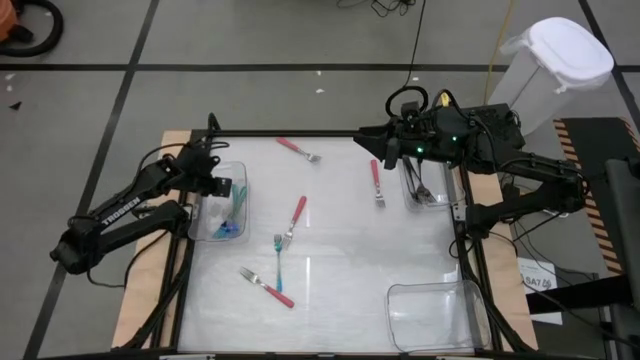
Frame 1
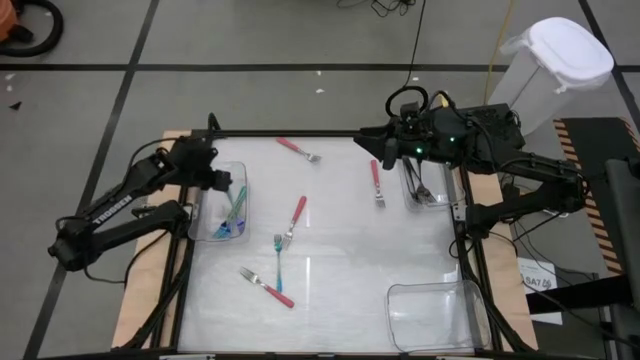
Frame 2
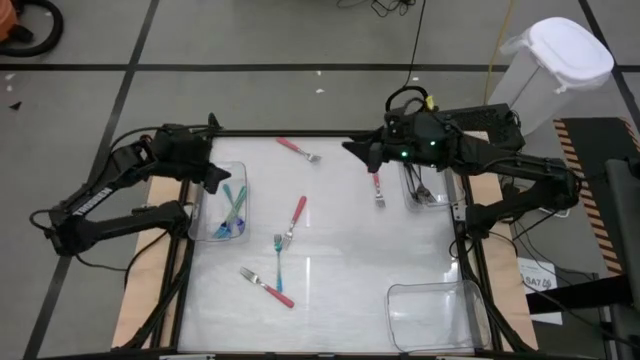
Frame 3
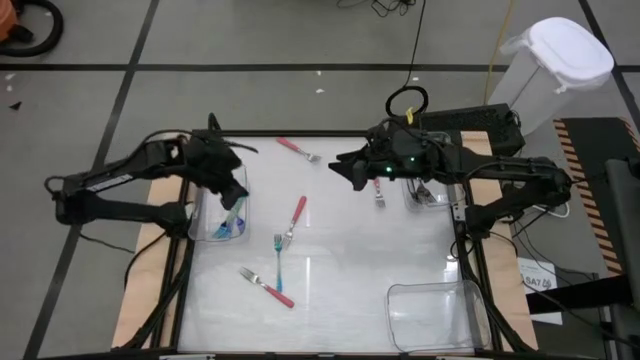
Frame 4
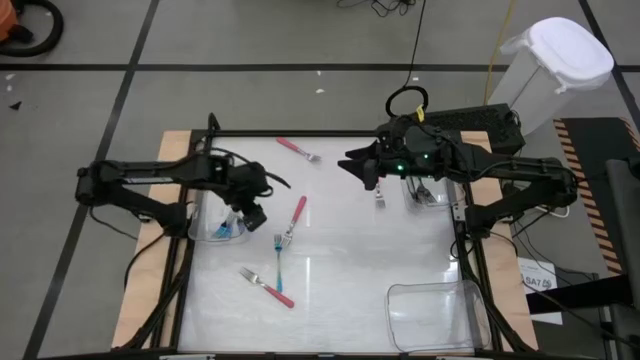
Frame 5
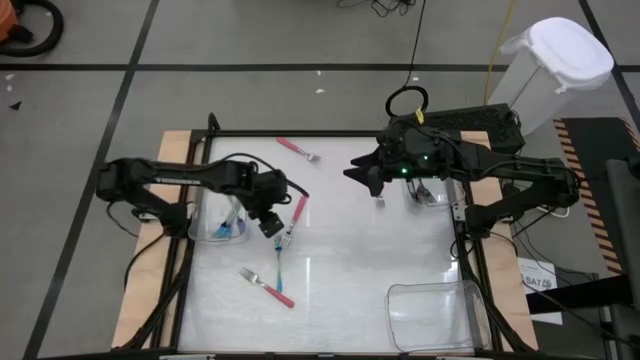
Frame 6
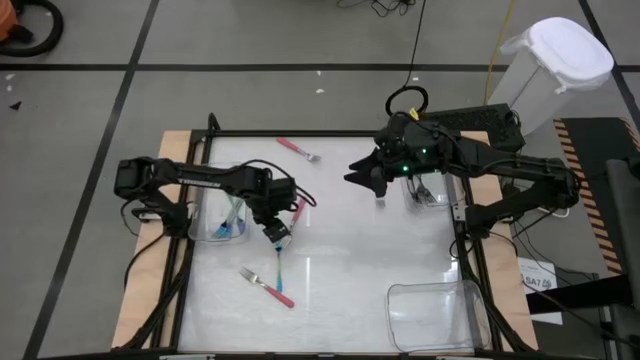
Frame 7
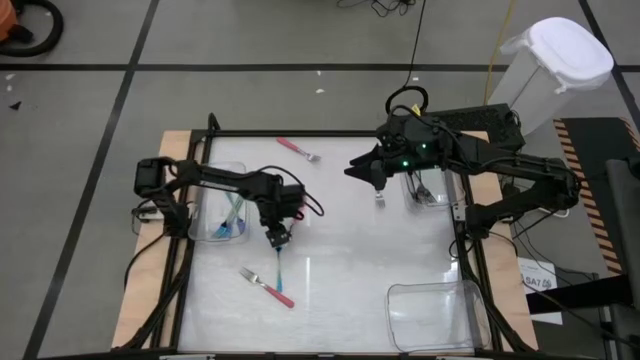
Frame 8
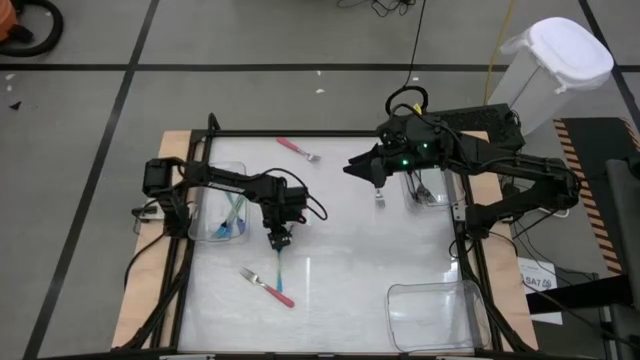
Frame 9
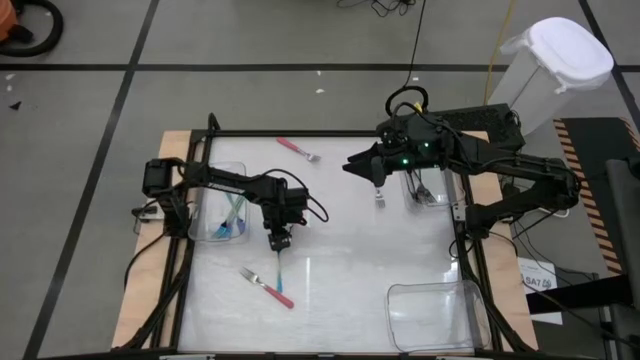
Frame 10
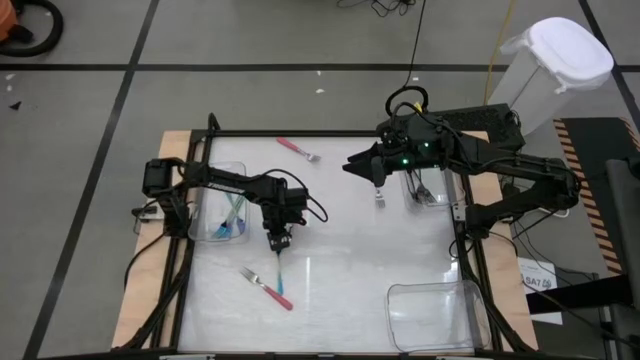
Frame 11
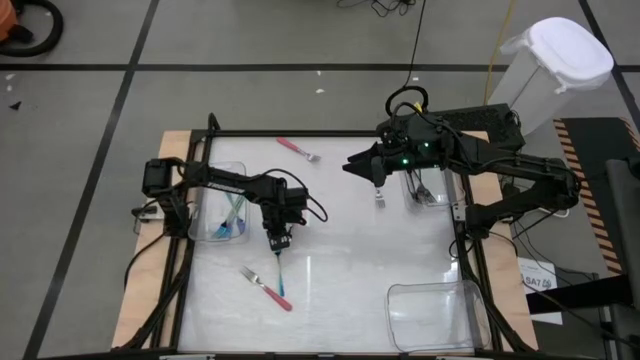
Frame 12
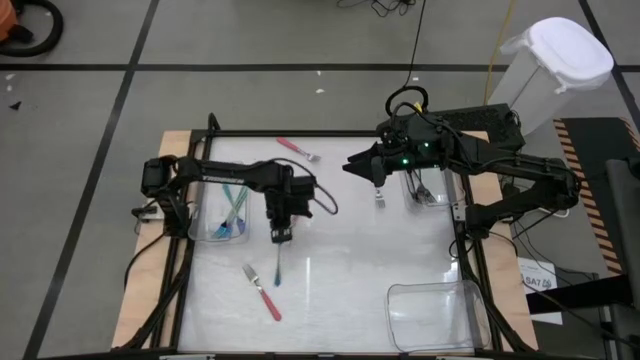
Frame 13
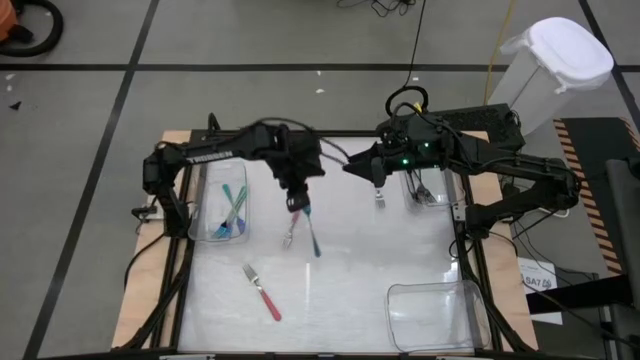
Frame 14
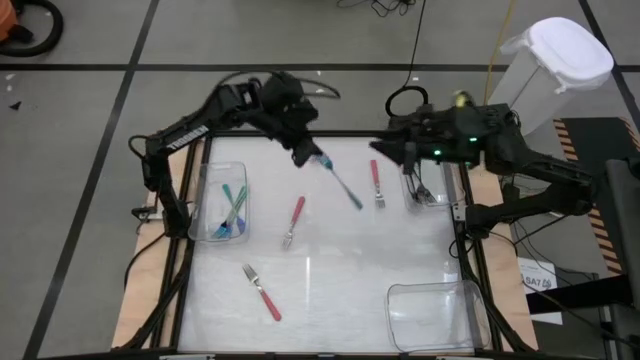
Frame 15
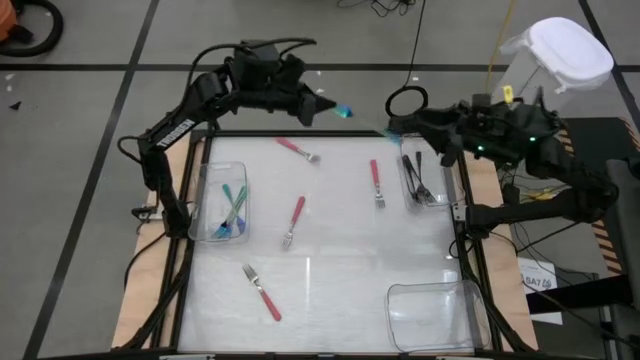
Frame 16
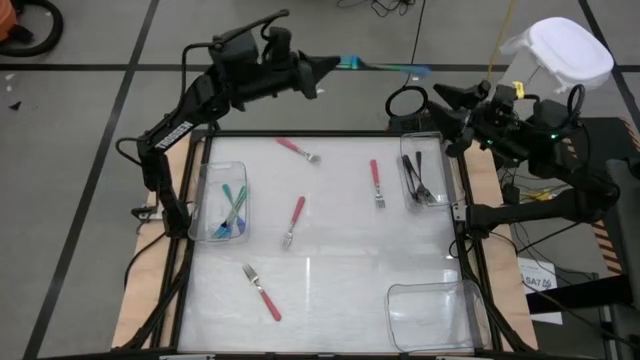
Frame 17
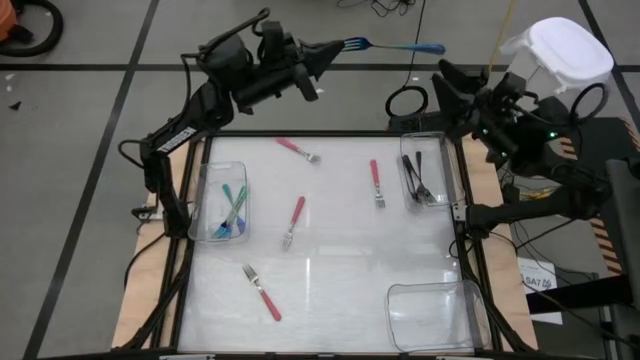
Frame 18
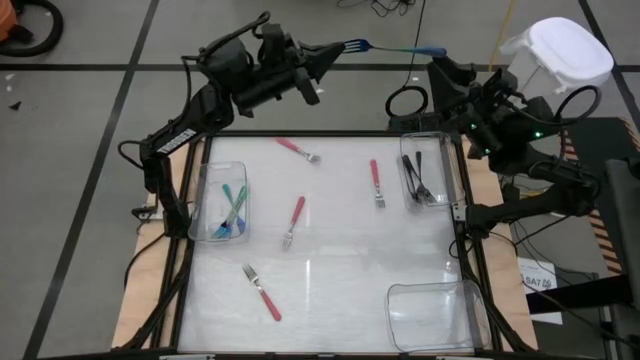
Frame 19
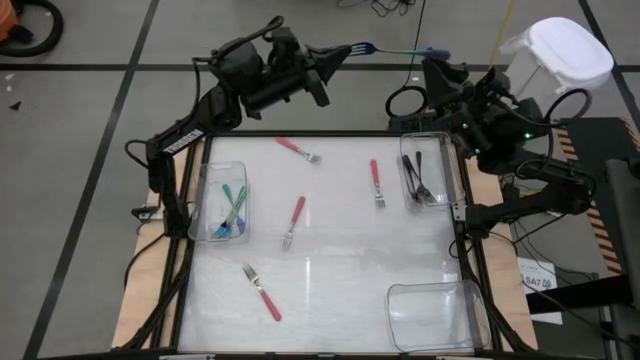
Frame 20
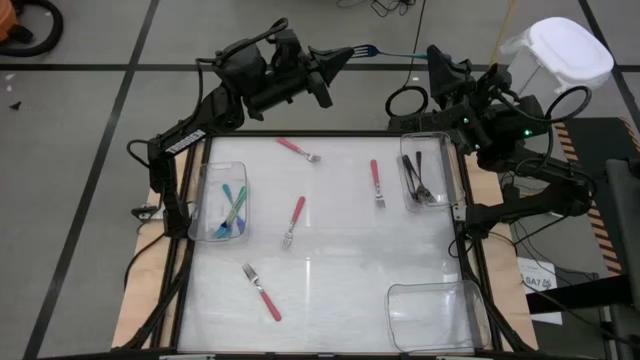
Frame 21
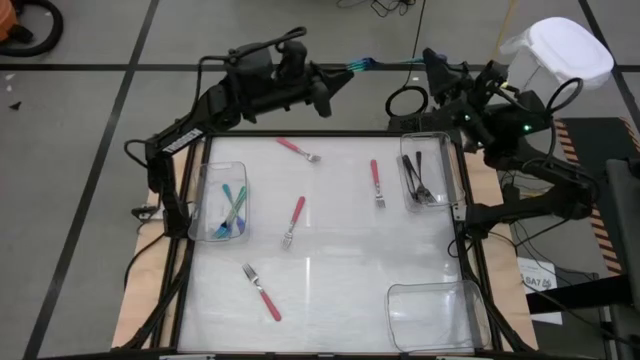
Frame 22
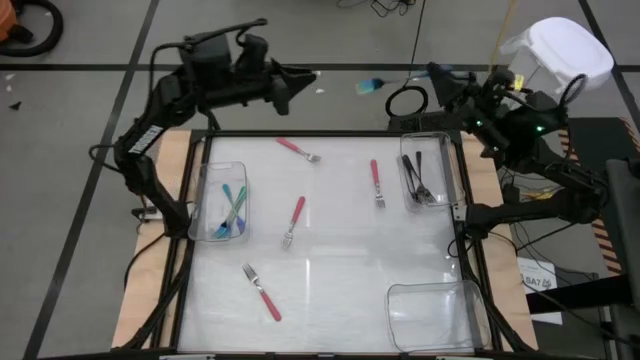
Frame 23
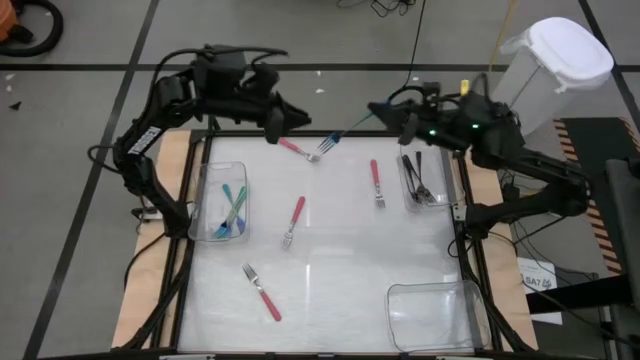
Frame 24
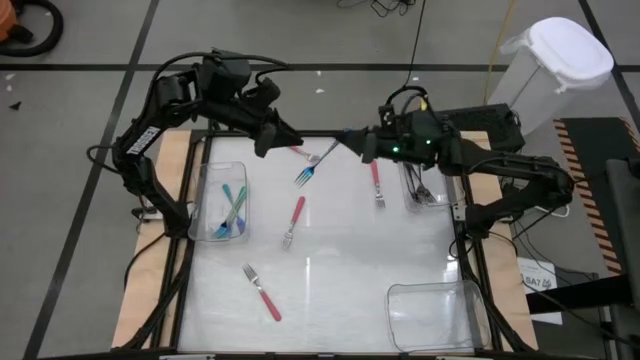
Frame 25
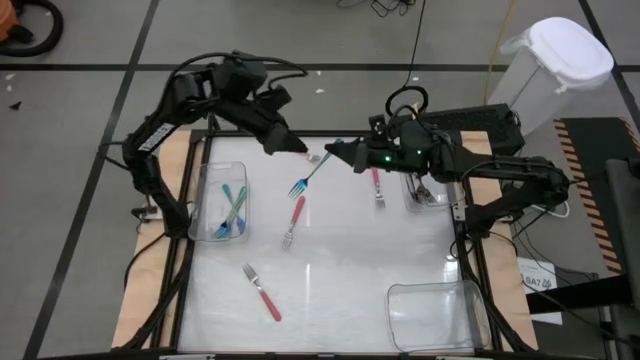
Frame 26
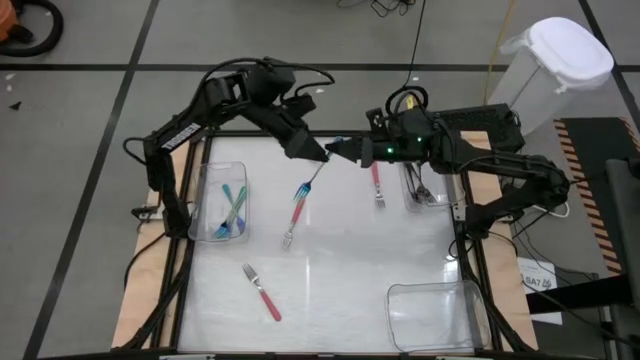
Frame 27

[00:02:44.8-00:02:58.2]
Task: Sort silverware by color (type)
Put the blue fork into the left transparent bin

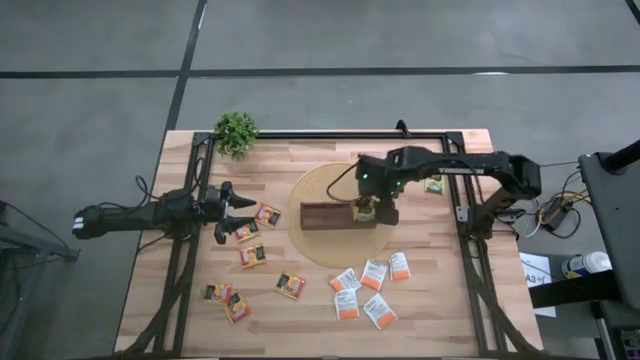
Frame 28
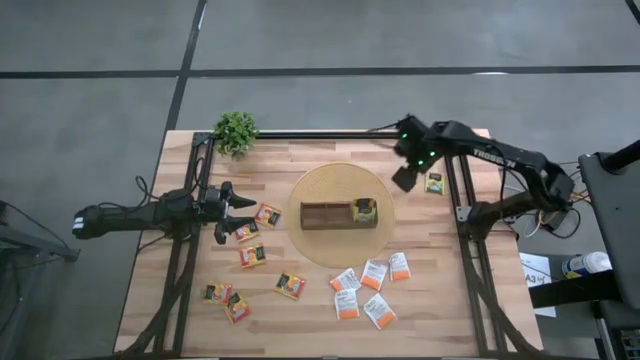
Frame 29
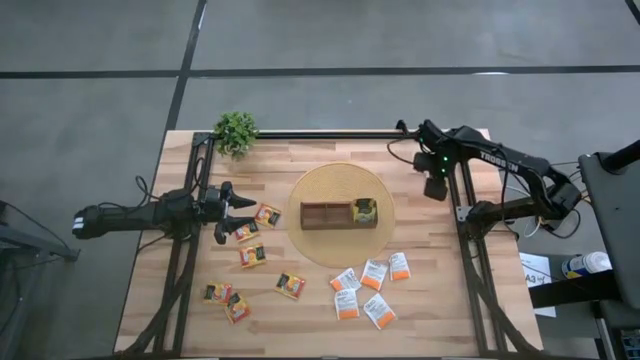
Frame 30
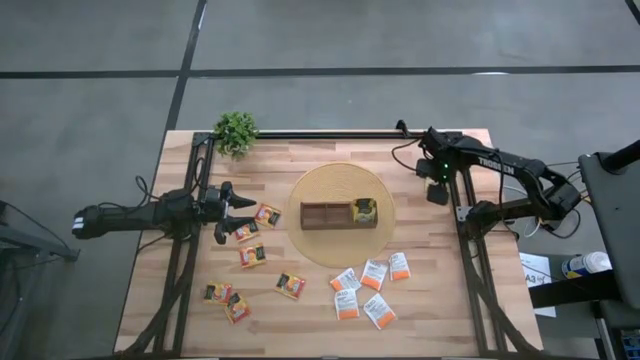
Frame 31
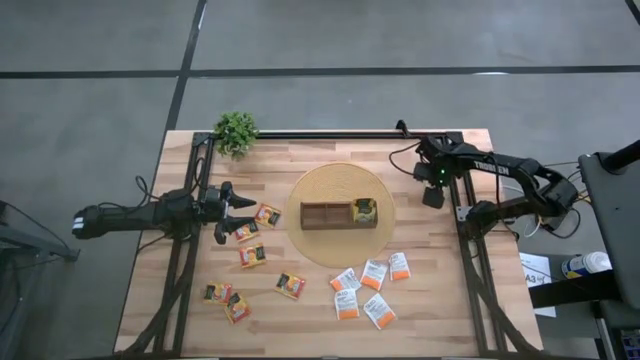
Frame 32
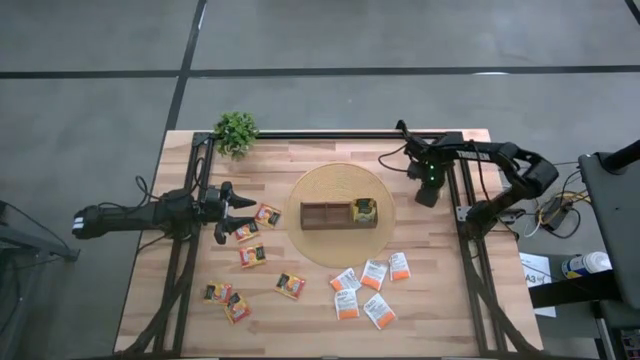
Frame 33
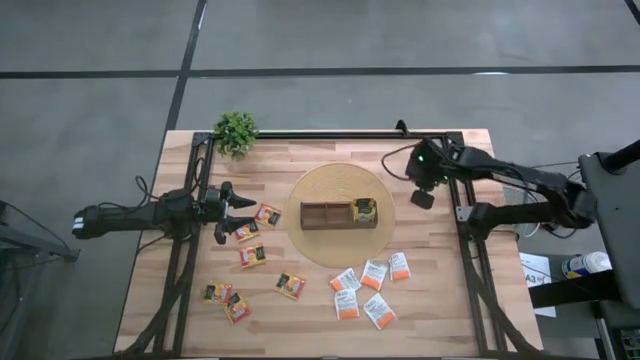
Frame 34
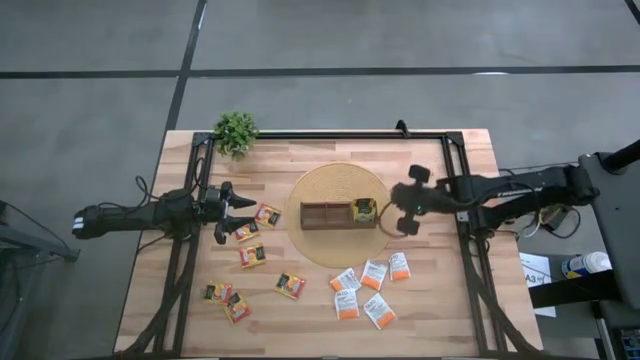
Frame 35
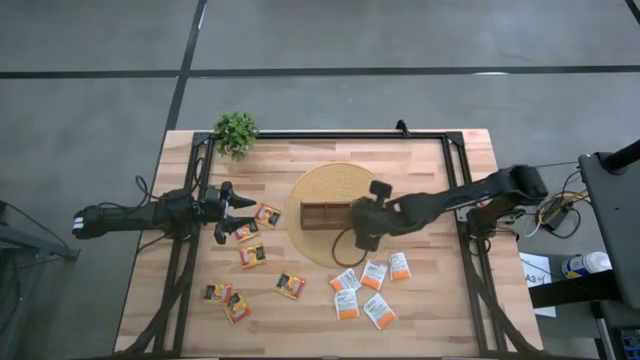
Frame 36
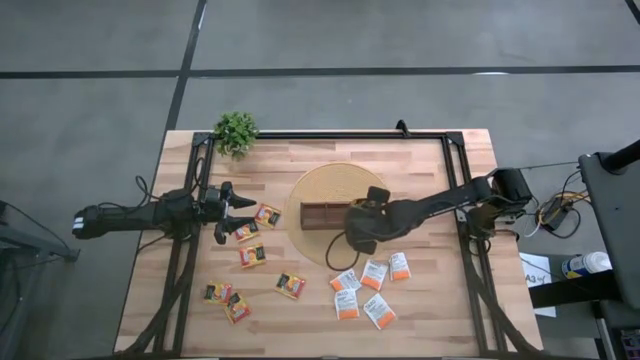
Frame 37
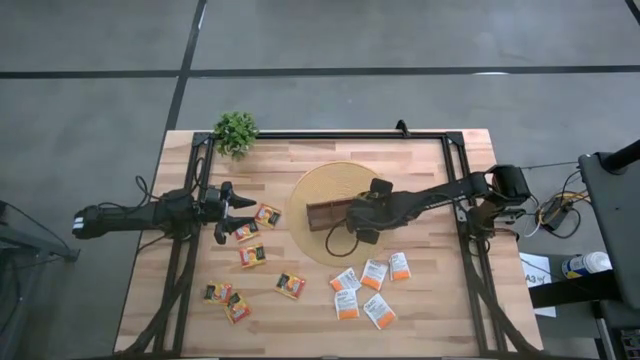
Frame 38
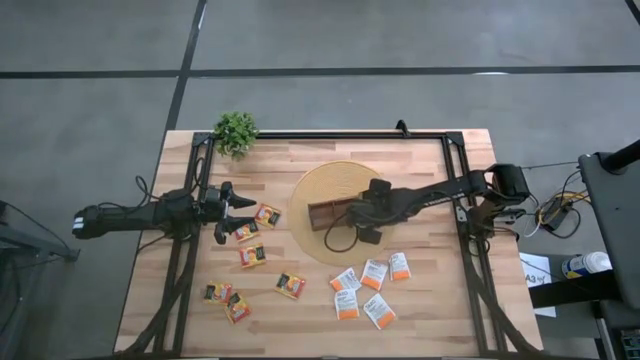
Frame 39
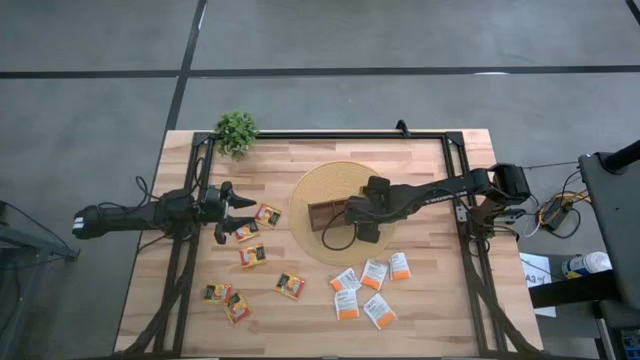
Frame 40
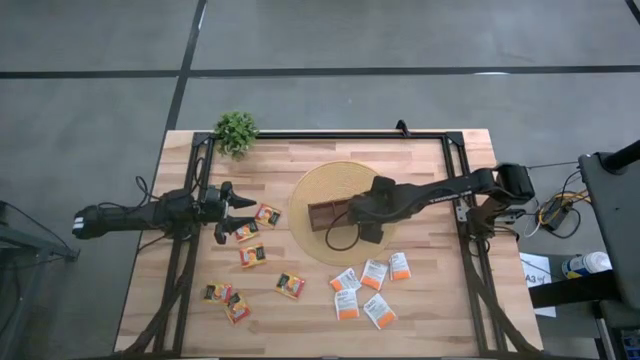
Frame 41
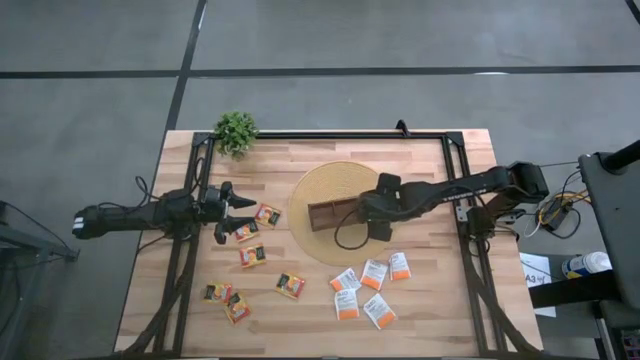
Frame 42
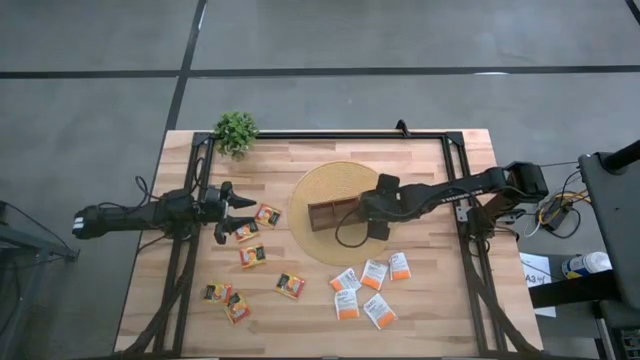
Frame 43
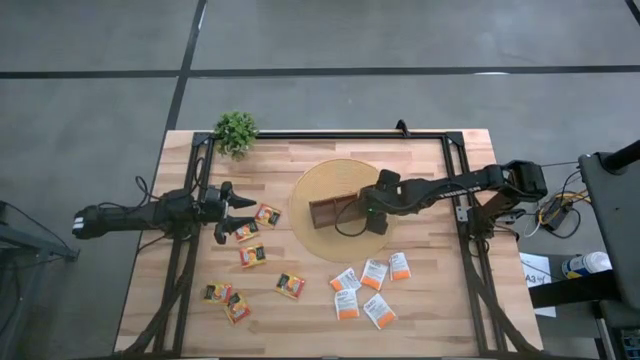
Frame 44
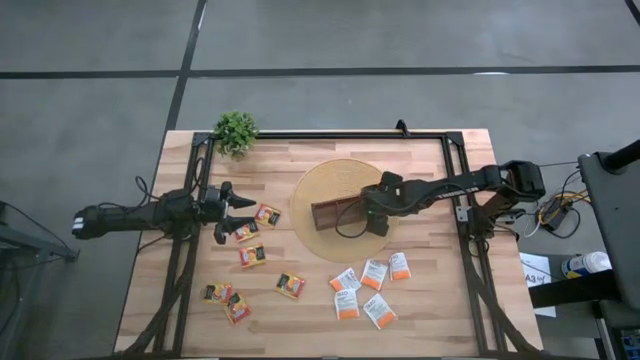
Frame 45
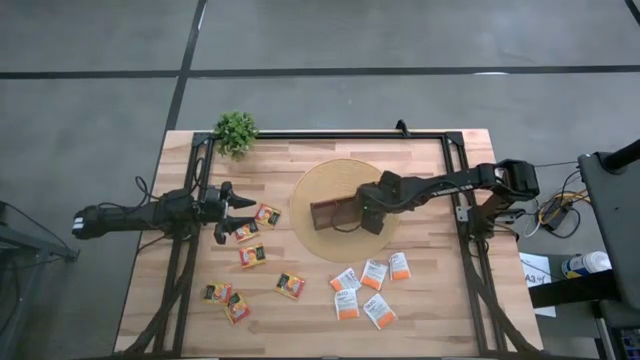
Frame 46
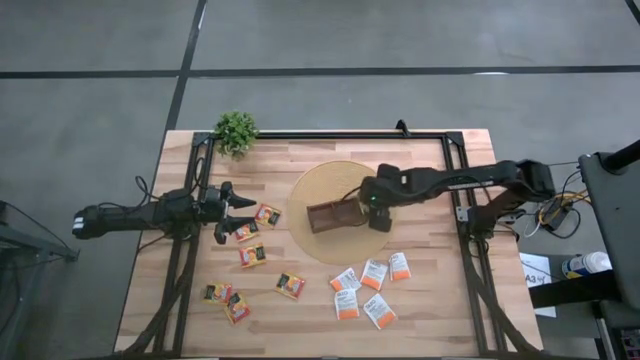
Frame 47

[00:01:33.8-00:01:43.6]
Task: Pick & Place Tea
Put the yellow tea bag into the right section of the wooden organizer
